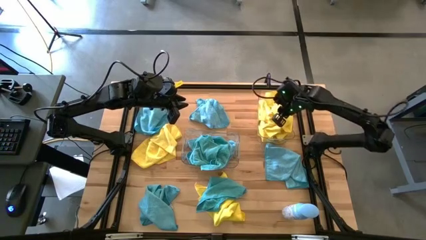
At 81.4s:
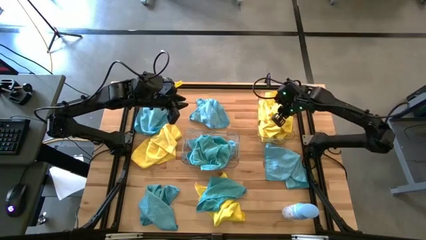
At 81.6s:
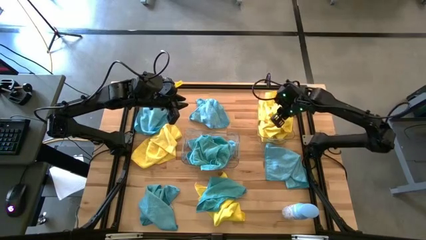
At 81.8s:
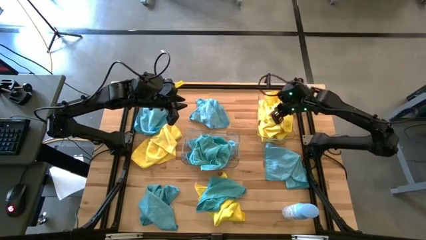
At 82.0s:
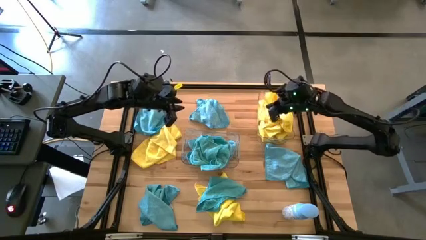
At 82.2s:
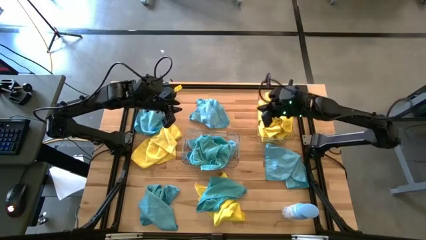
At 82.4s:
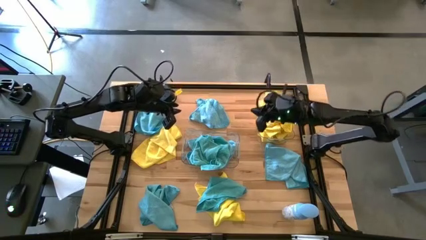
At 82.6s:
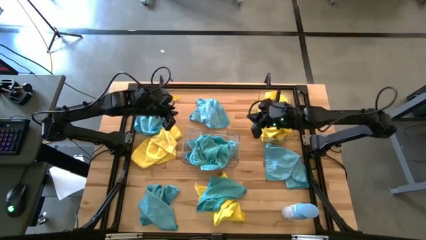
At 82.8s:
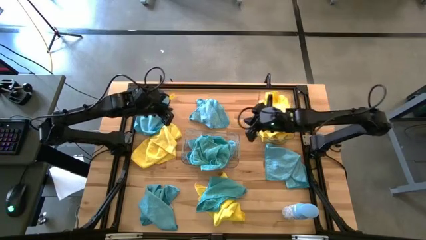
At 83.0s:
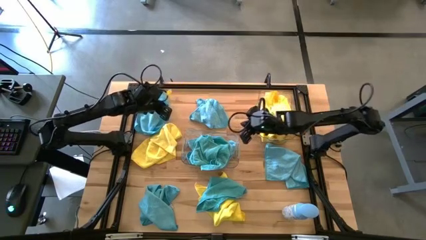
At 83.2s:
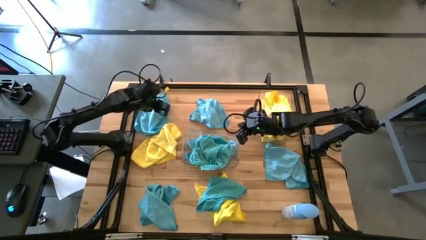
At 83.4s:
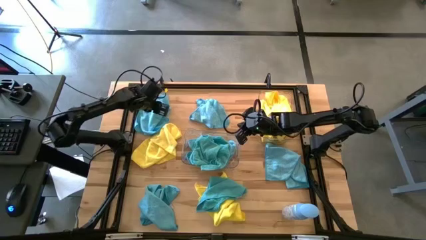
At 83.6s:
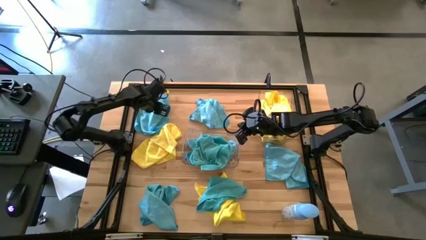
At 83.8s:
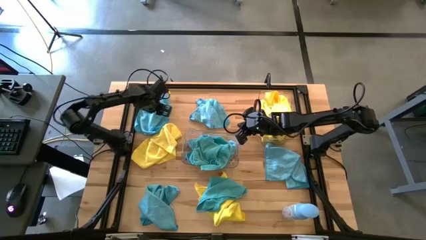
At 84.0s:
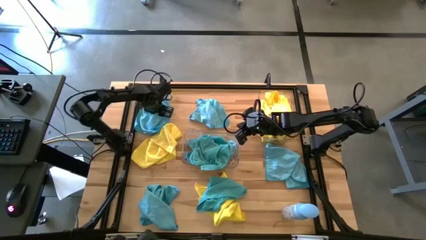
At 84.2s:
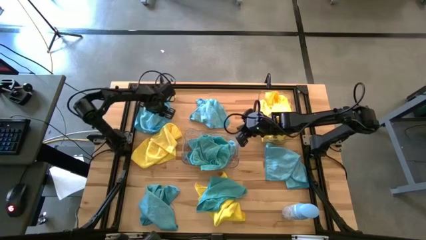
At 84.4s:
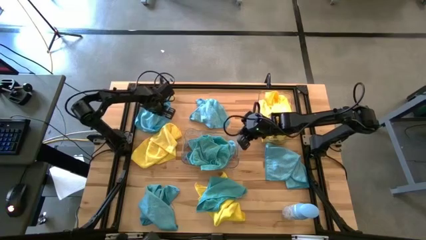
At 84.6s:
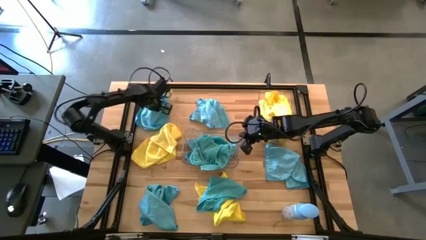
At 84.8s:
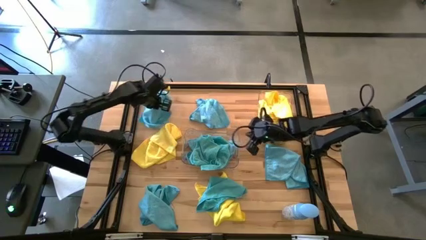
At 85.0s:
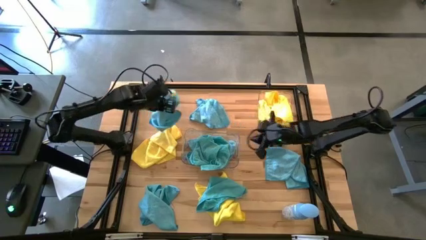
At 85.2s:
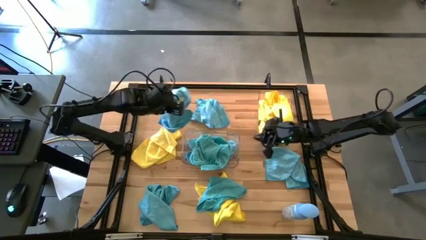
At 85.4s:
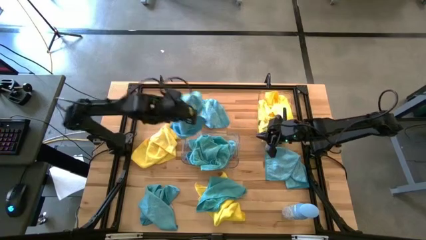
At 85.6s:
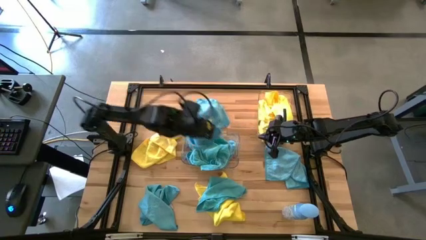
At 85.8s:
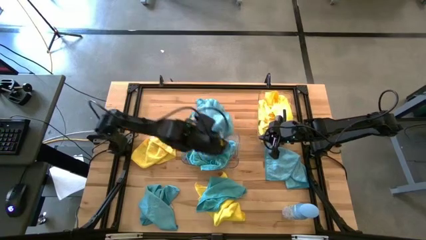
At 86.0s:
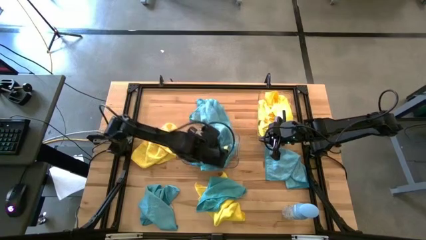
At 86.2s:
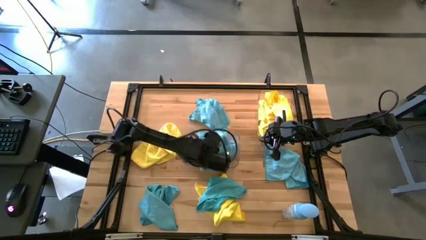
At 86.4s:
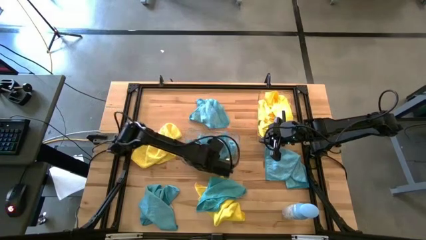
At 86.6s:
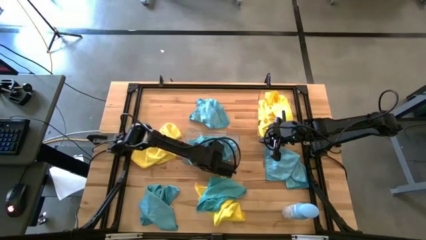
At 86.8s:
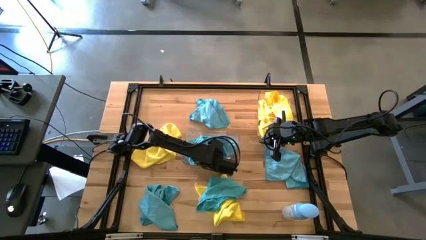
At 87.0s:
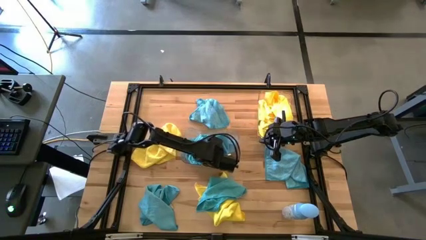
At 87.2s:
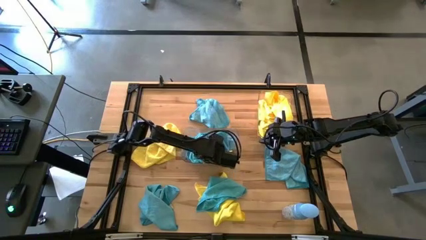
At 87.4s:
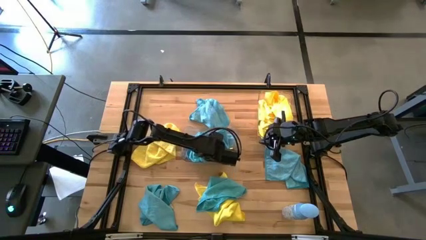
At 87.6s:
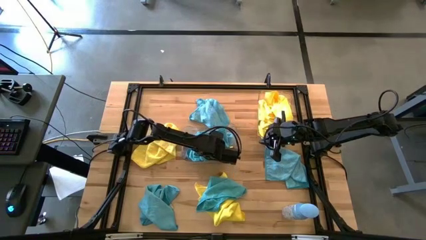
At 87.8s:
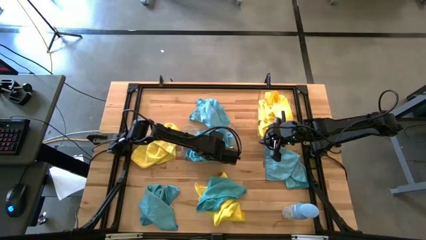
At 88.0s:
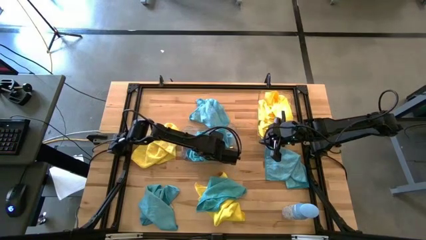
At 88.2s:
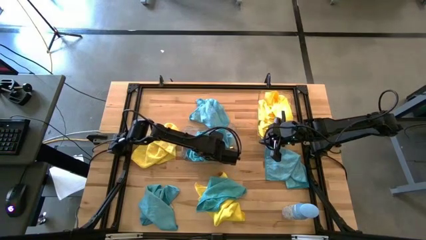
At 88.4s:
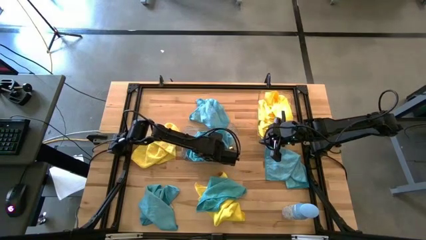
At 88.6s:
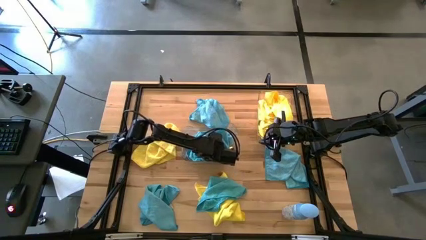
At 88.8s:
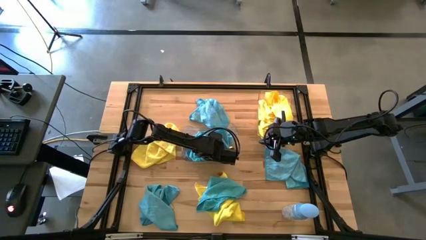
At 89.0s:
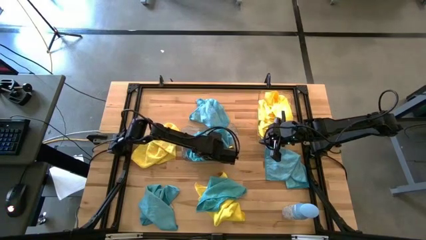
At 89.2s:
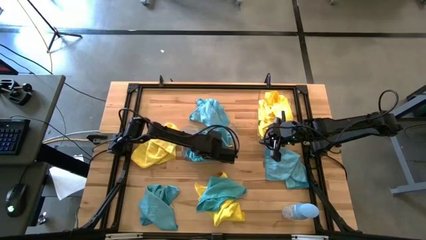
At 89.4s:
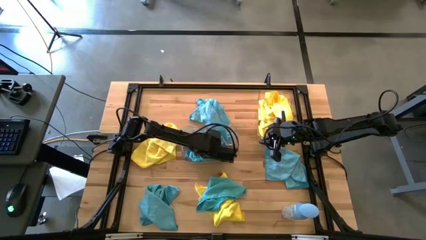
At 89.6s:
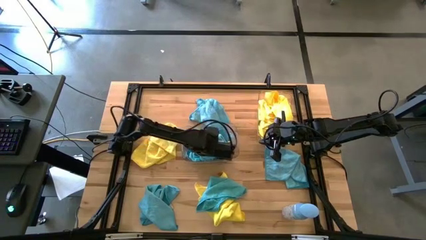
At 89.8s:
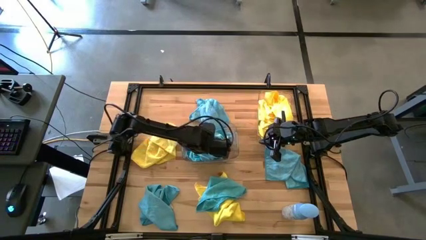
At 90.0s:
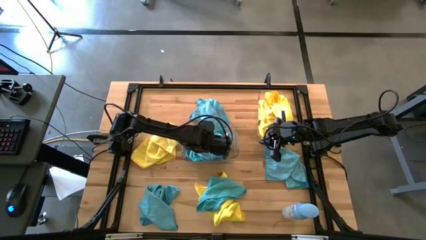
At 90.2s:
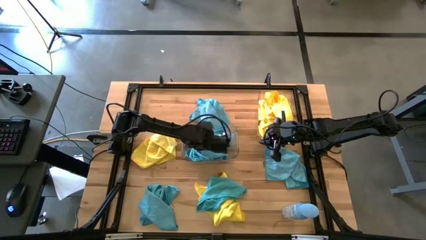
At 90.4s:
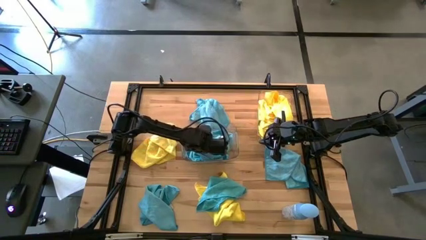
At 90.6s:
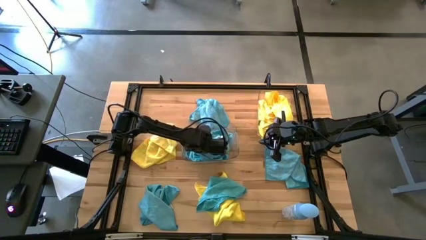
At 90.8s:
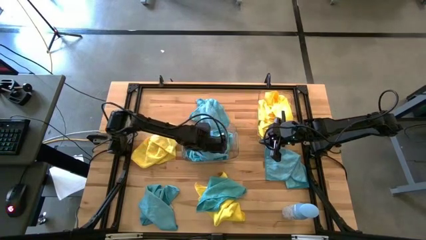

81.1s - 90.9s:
Task: Sort microfiber towel by color & place in baskets
Put the blue towel into the bottom transparent bin

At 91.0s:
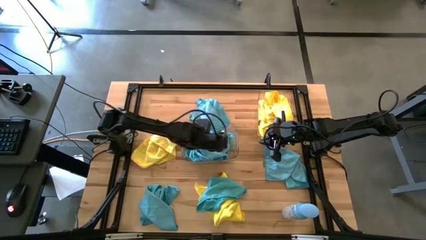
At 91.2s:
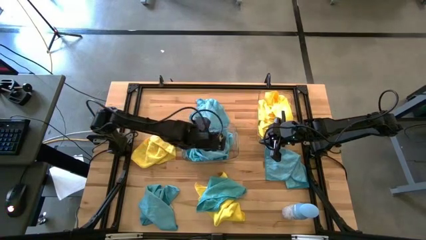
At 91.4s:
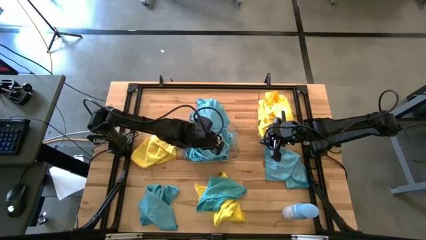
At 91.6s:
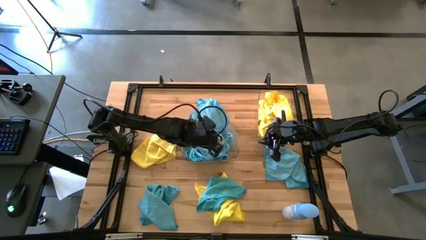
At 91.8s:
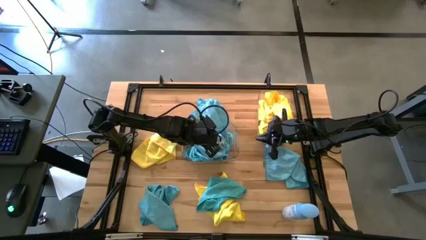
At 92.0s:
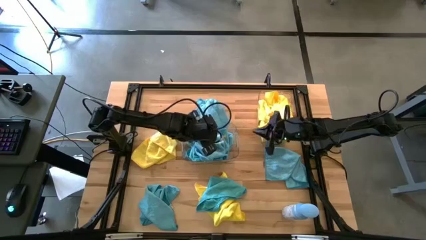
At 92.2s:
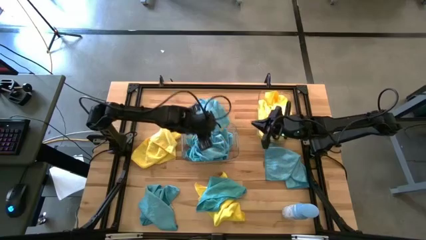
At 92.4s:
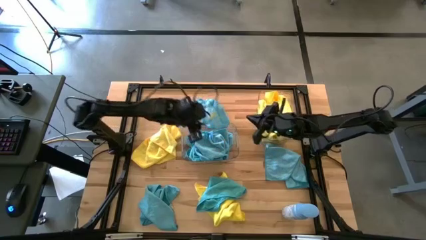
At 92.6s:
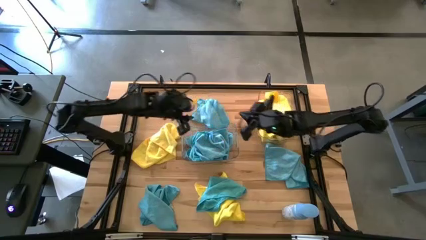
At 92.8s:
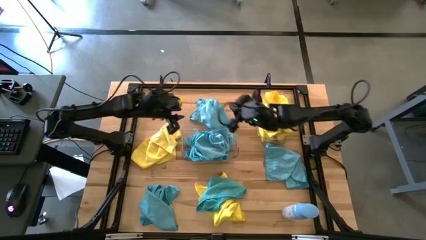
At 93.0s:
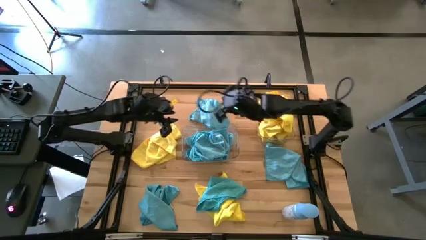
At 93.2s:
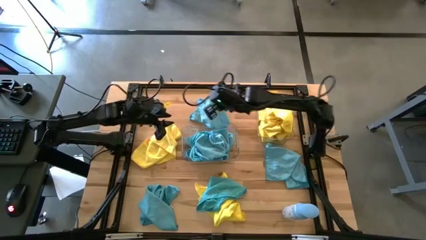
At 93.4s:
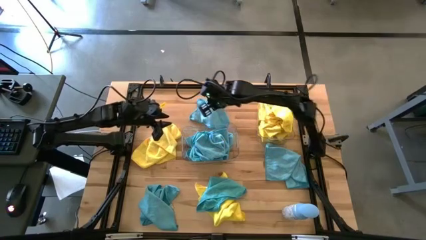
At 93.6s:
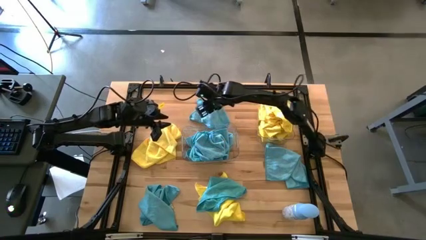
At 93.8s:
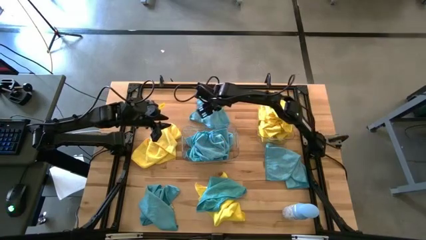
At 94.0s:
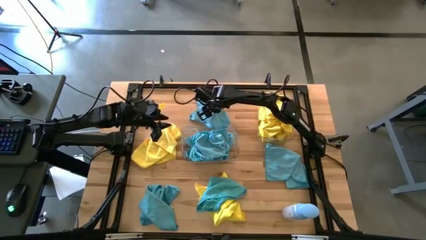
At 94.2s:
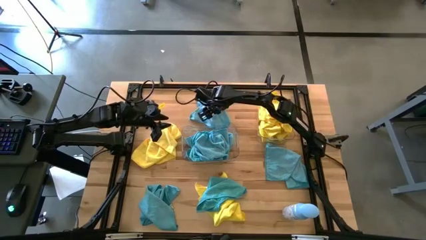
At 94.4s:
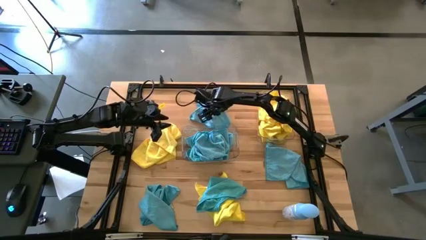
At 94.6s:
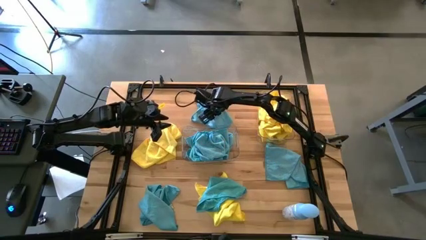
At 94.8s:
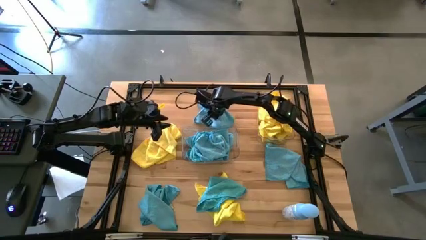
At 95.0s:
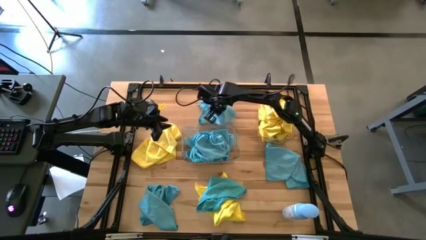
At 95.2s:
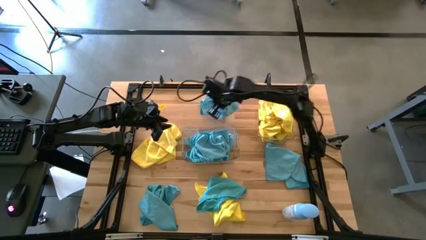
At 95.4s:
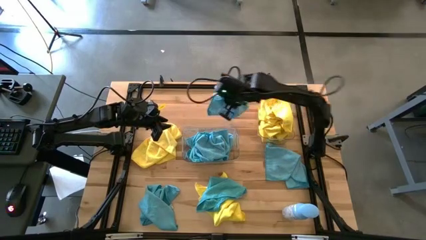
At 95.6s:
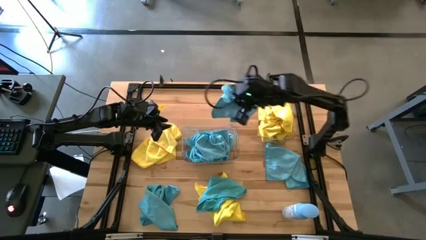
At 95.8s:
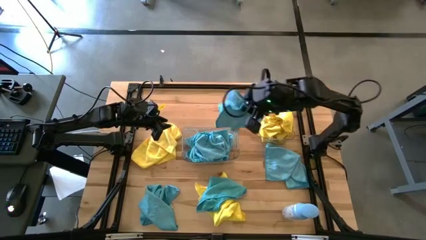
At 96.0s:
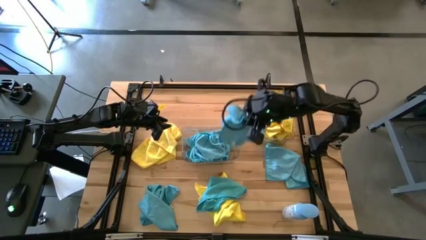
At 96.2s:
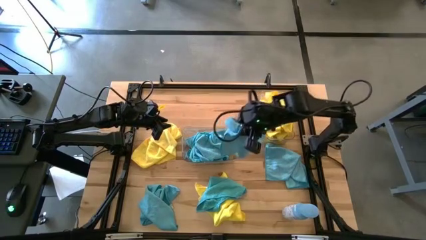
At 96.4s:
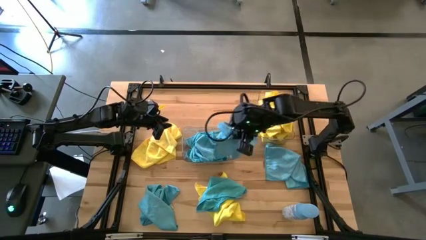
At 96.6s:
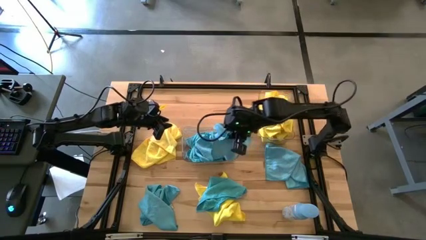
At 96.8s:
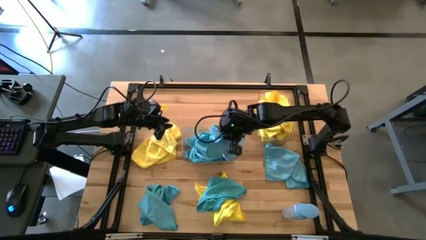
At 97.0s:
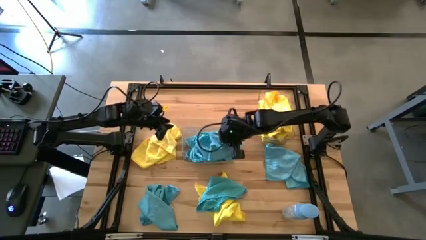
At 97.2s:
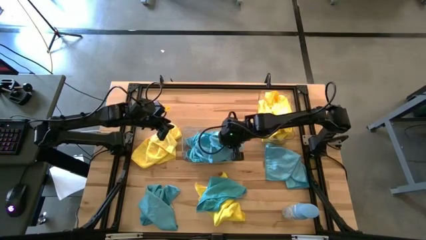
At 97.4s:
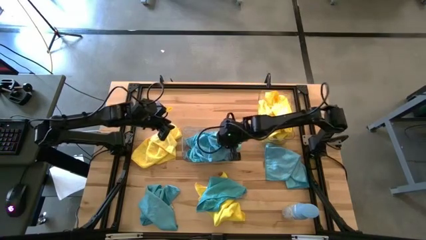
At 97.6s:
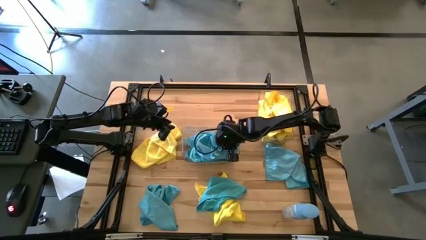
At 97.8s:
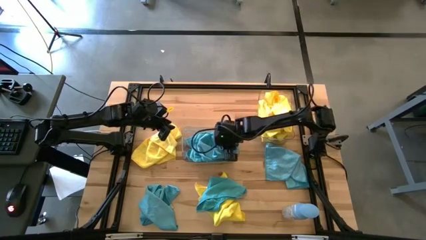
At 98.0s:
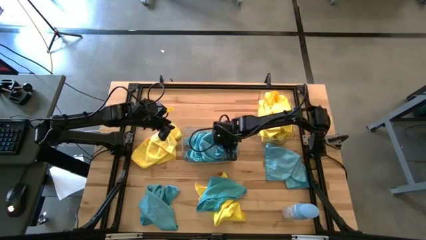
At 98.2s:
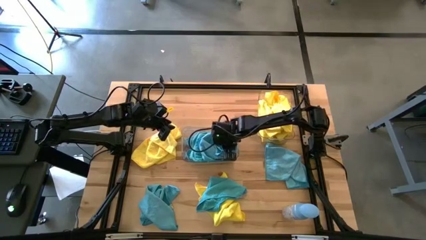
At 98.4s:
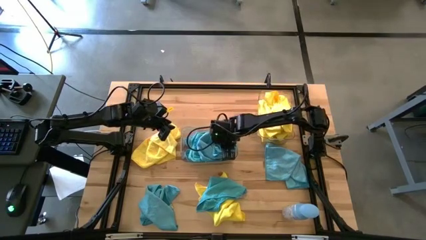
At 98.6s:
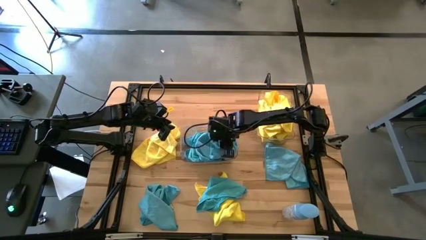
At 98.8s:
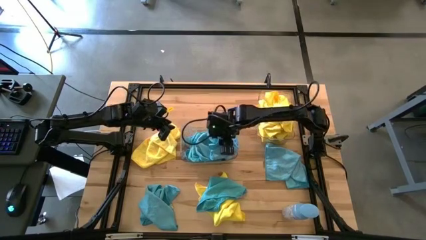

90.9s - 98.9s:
Put the blue towel into the bottom transparent bin
